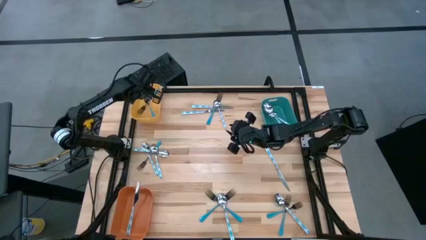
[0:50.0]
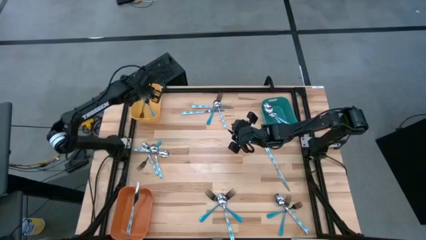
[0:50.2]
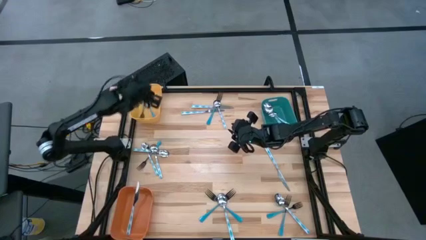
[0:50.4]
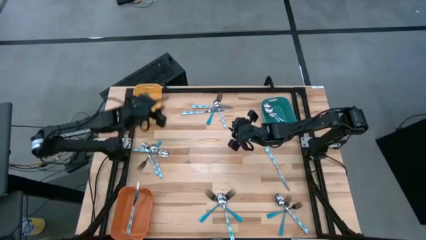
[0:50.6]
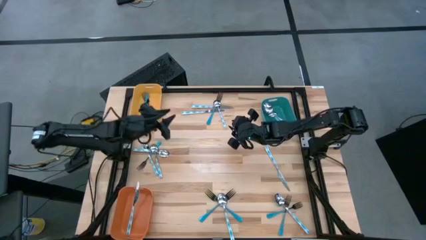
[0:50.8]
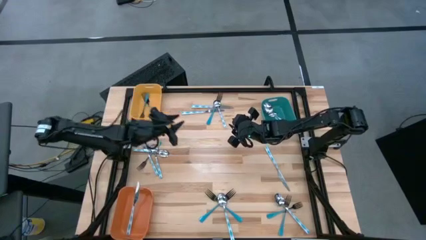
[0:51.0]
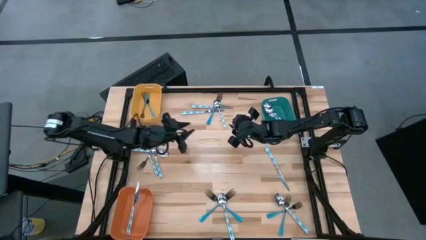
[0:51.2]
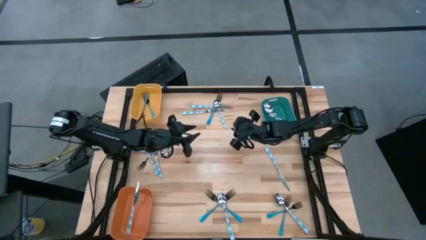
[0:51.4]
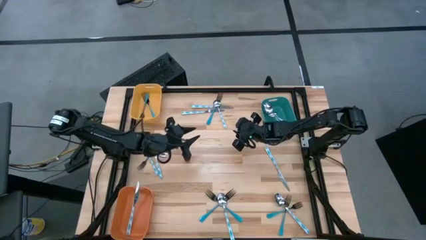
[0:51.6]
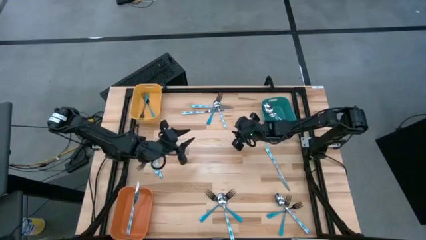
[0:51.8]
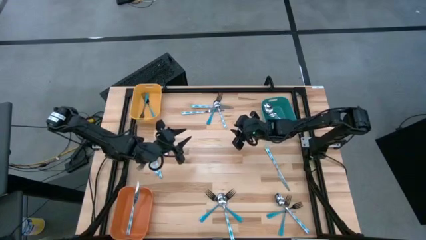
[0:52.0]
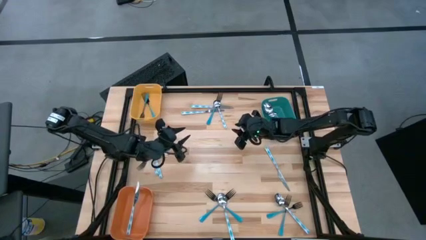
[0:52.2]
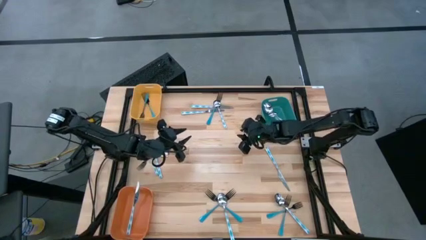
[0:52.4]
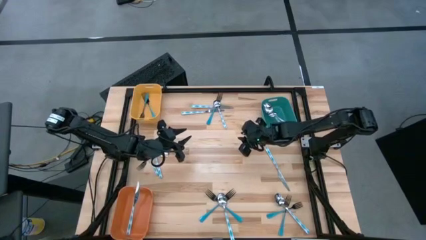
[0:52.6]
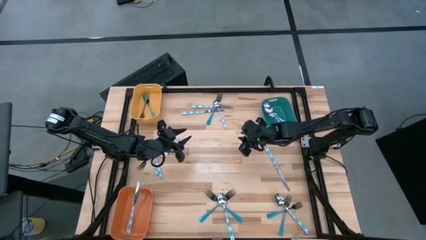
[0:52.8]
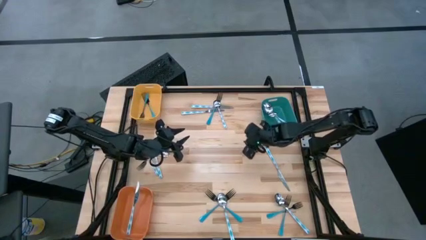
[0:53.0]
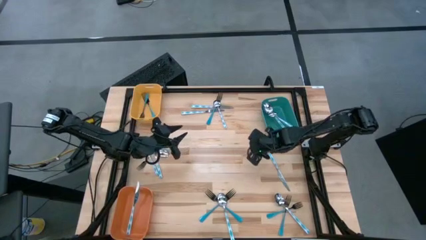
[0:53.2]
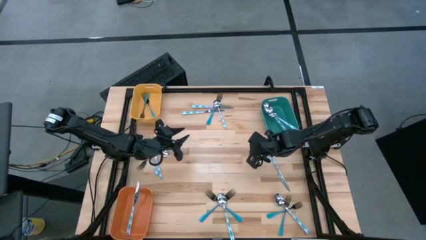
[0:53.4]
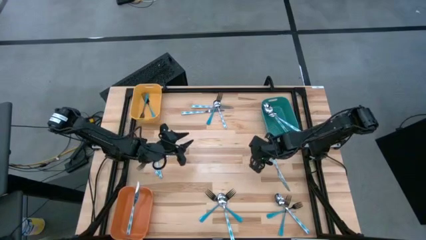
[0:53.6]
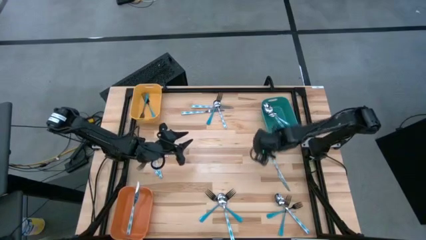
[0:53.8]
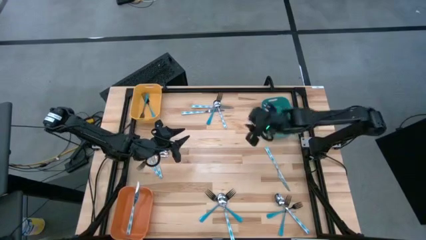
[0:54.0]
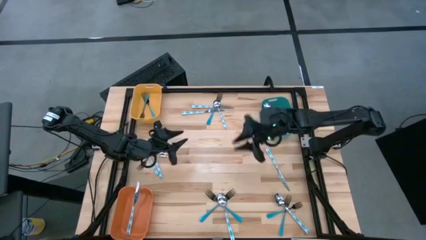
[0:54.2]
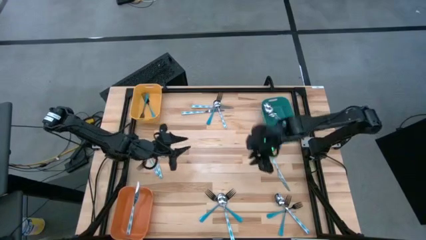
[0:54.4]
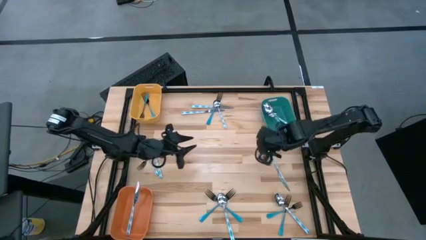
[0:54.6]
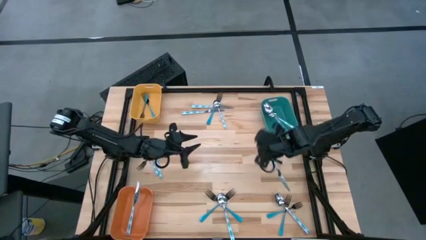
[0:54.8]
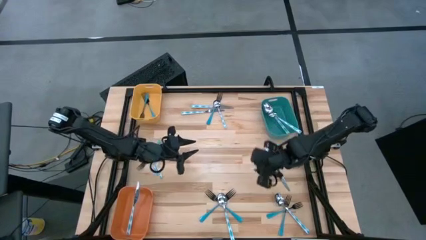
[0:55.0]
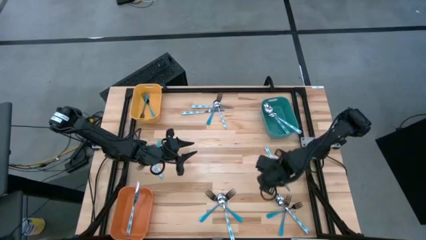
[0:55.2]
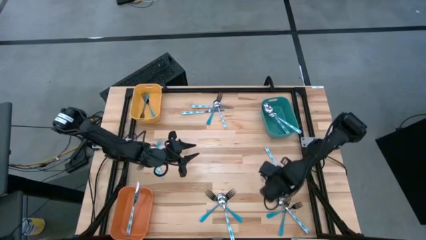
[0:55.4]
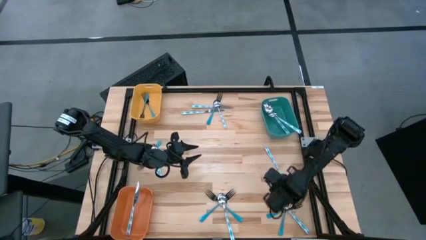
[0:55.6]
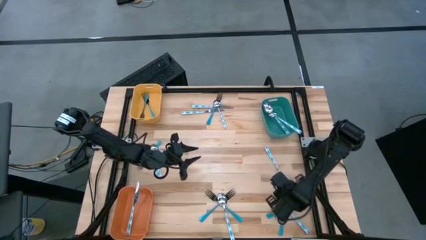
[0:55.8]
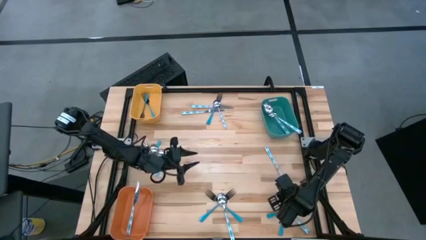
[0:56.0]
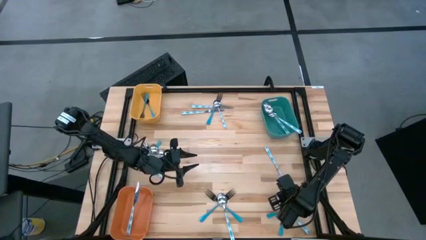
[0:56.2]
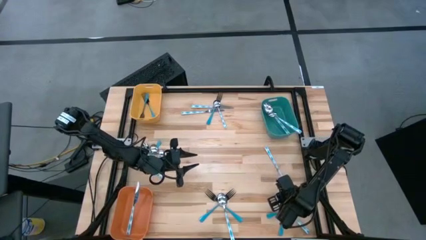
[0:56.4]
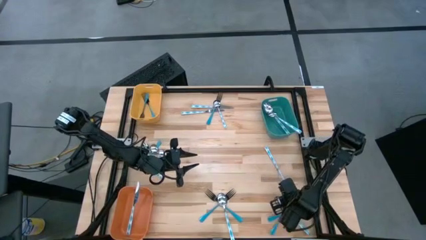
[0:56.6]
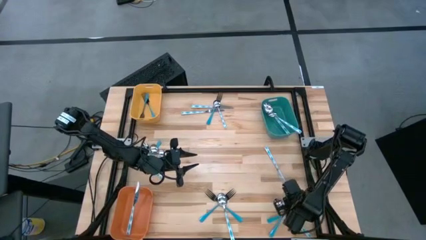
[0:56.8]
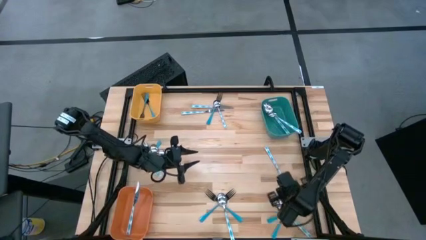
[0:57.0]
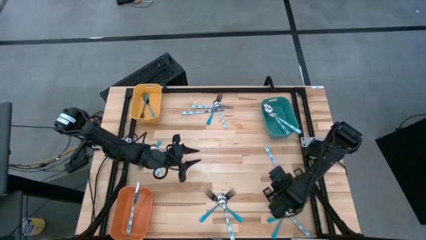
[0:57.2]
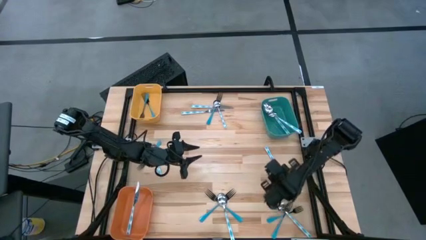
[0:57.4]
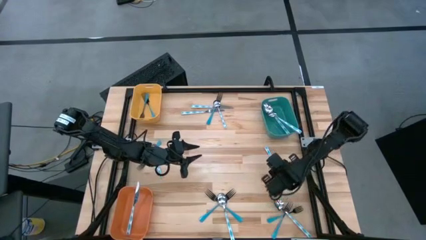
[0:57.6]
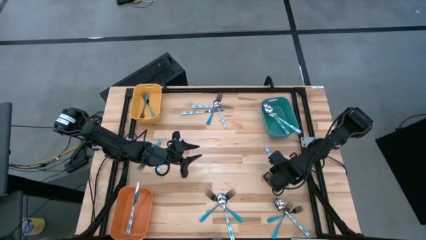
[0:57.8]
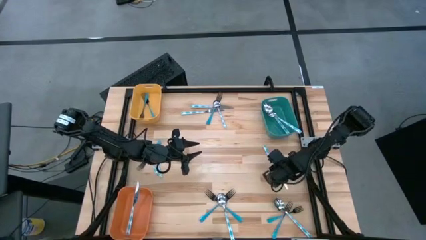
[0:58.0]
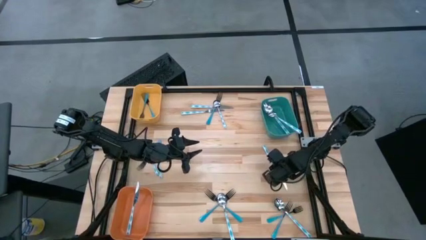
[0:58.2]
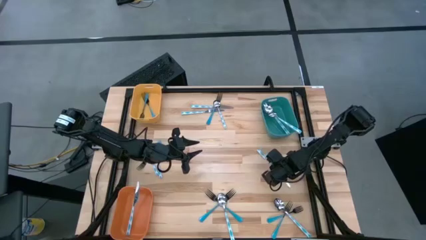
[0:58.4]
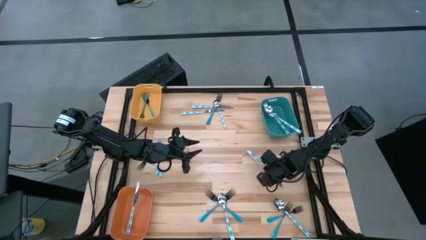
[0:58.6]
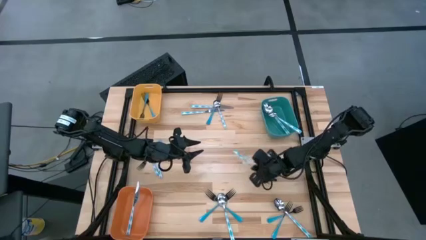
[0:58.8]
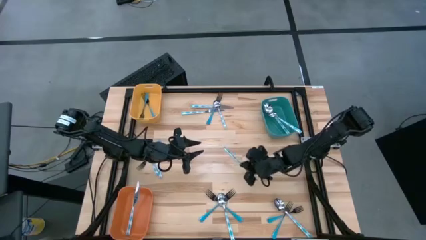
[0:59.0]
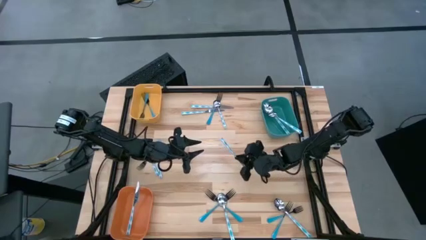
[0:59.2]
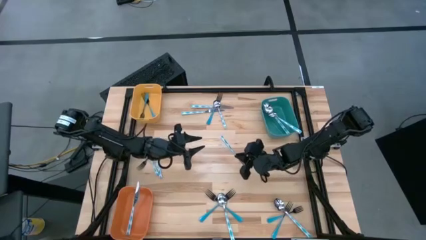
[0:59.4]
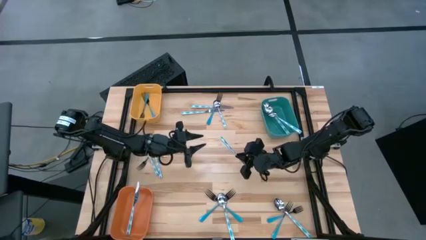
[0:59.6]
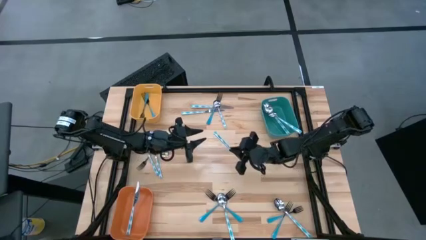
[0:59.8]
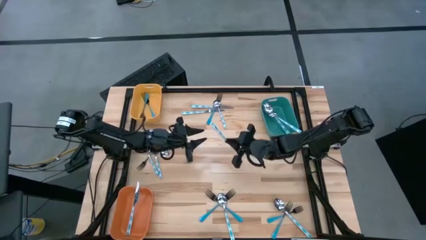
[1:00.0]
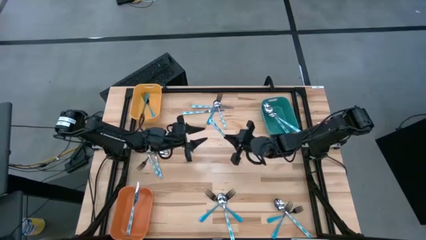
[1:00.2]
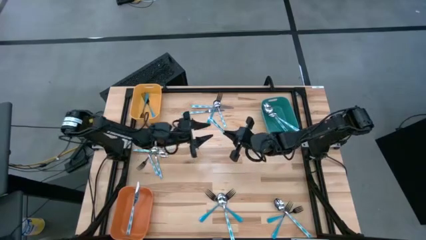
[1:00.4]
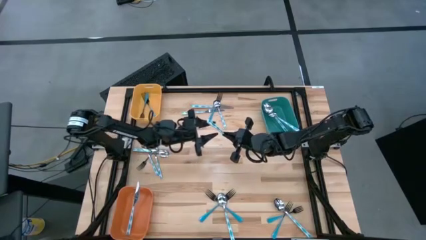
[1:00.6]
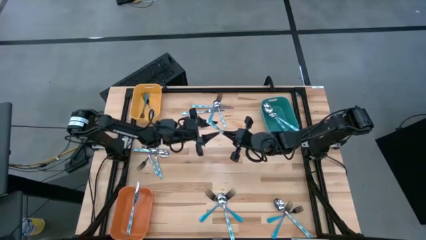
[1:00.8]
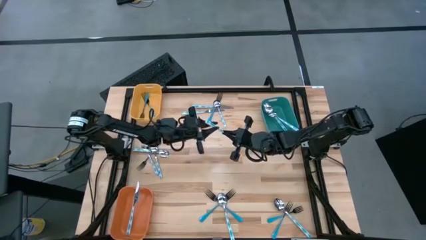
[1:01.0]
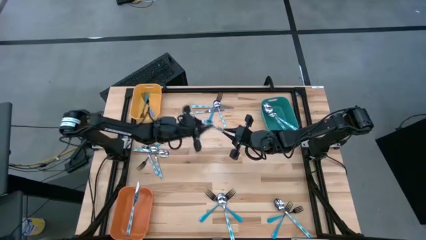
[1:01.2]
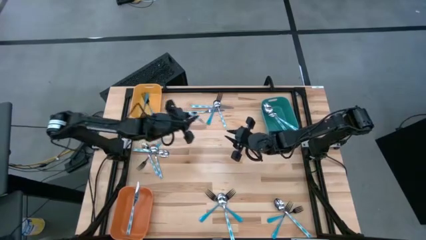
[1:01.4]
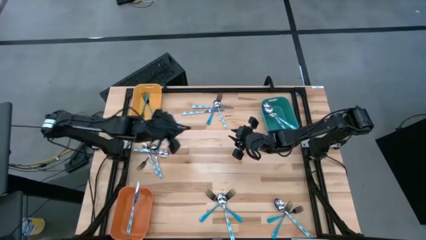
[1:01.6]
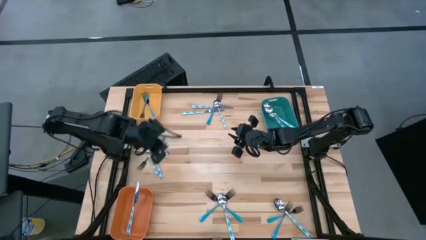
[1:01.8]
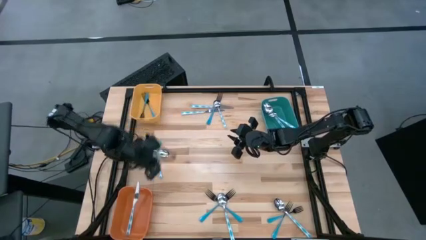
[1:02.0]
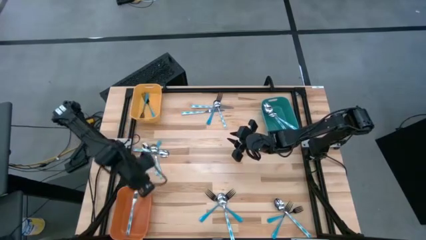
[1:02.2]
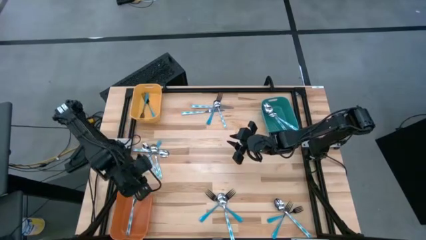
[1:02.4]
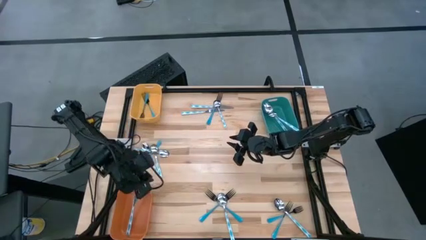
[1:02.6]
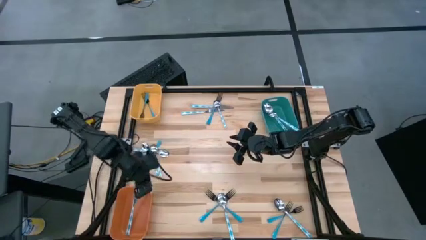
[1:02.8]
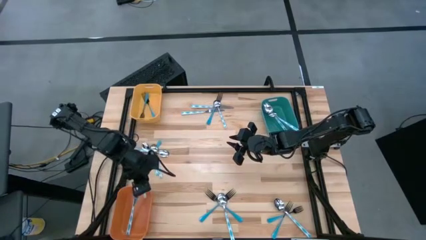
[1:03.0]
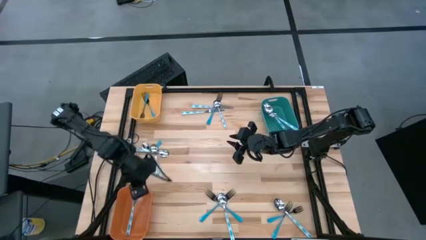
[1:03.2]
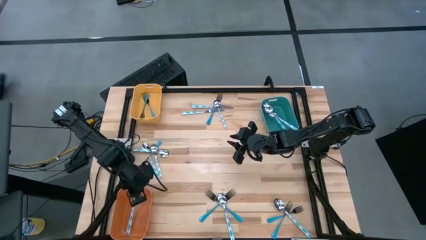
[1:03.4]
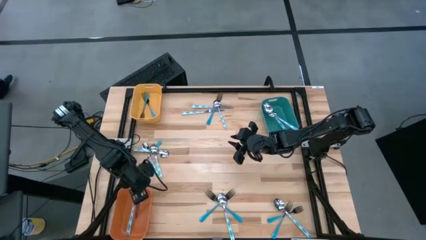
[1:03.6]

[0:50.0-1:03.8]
Task: Sort silverware by color (type)
Put the white-blue table knife into the orange bin
